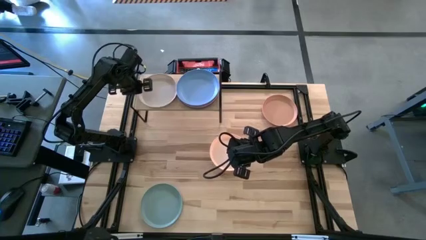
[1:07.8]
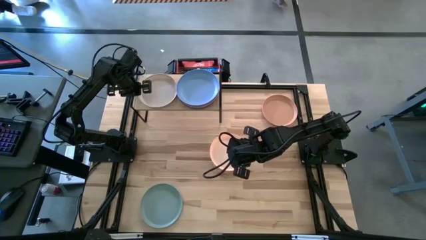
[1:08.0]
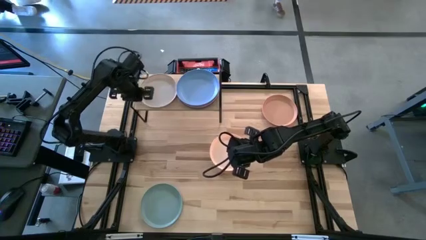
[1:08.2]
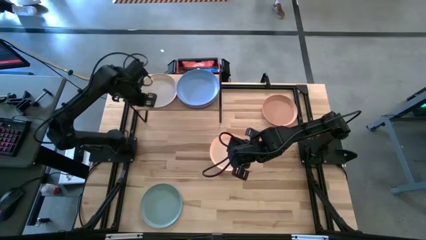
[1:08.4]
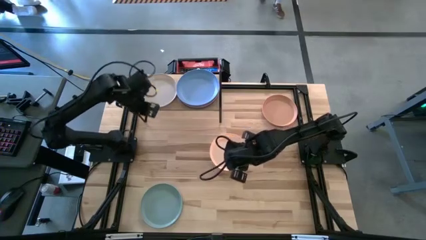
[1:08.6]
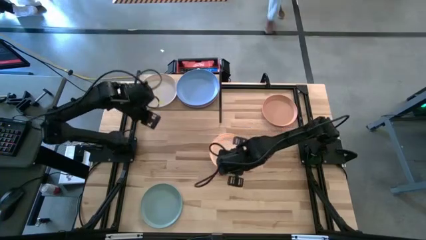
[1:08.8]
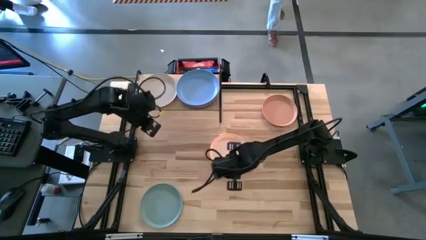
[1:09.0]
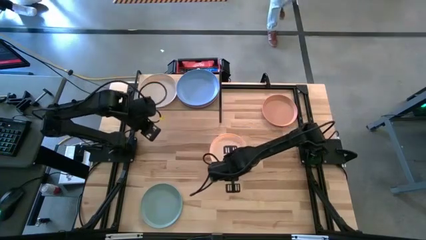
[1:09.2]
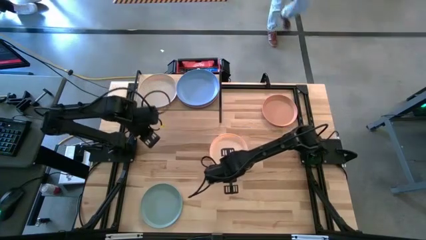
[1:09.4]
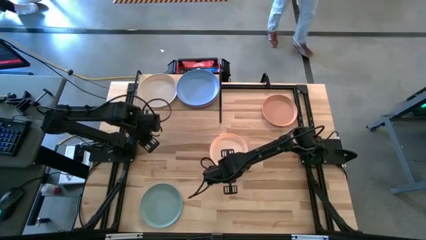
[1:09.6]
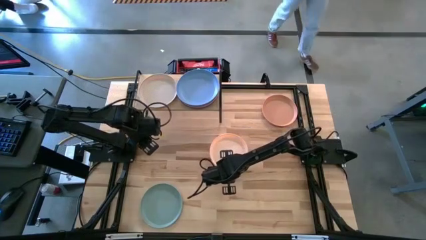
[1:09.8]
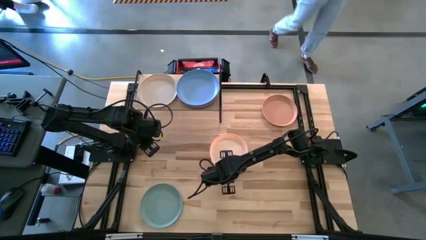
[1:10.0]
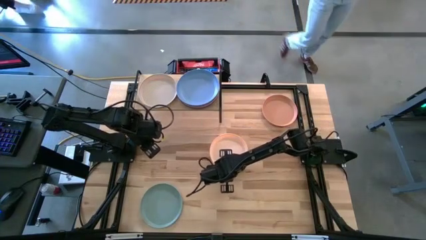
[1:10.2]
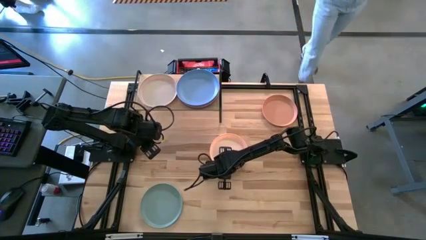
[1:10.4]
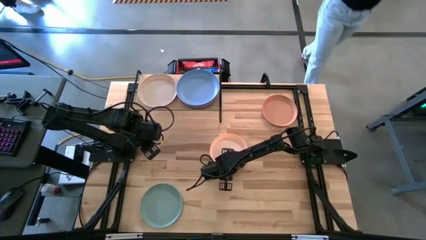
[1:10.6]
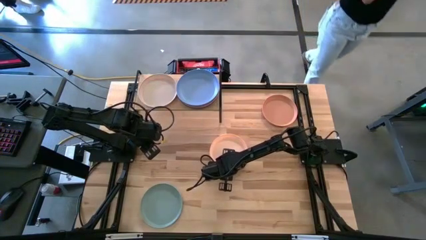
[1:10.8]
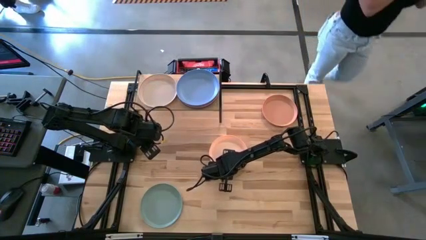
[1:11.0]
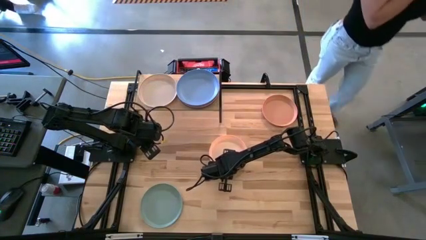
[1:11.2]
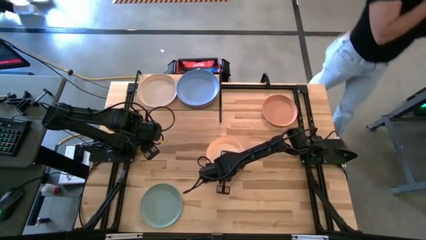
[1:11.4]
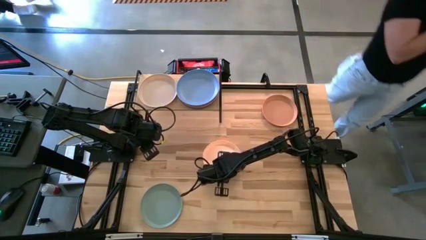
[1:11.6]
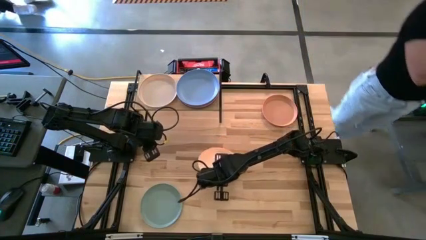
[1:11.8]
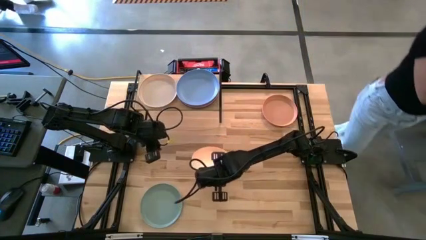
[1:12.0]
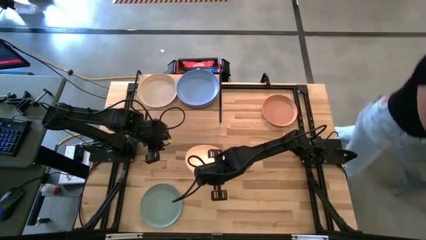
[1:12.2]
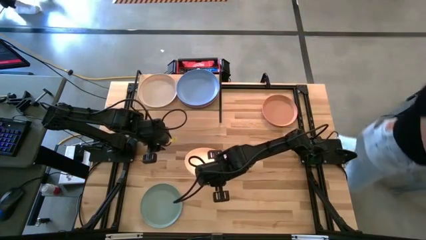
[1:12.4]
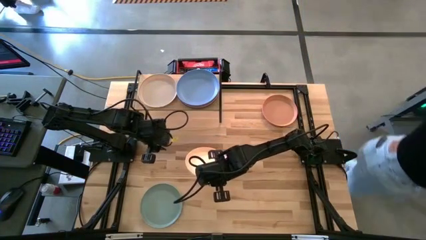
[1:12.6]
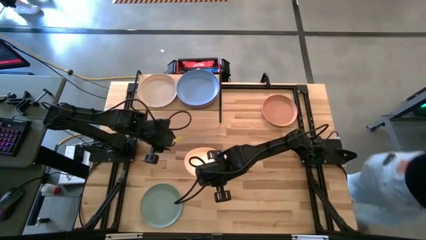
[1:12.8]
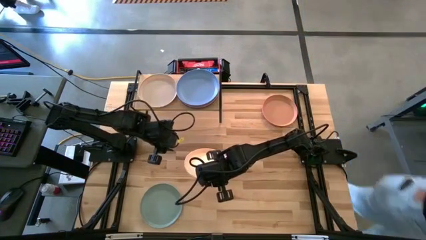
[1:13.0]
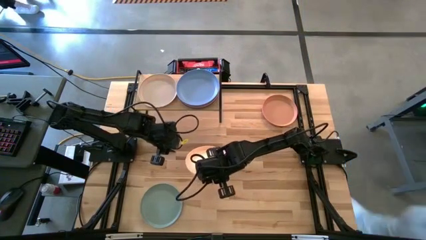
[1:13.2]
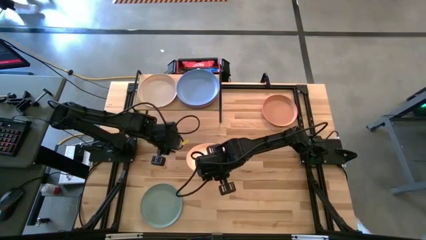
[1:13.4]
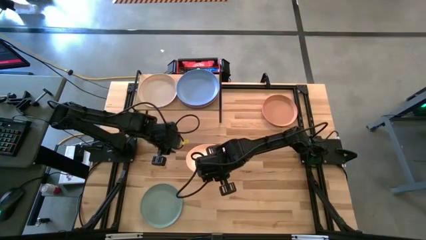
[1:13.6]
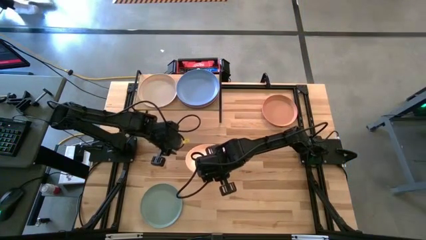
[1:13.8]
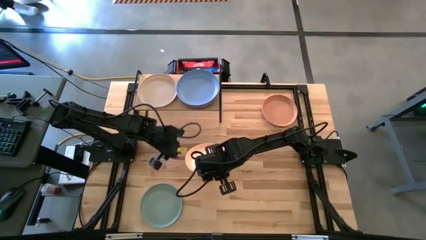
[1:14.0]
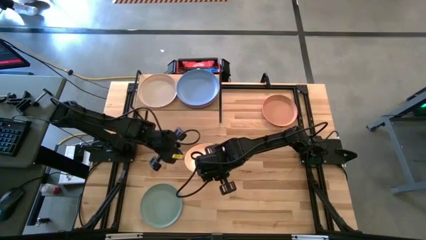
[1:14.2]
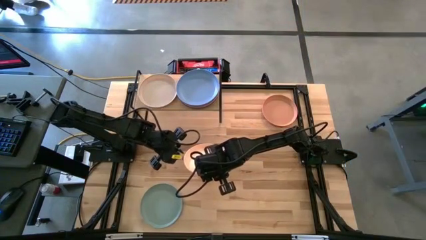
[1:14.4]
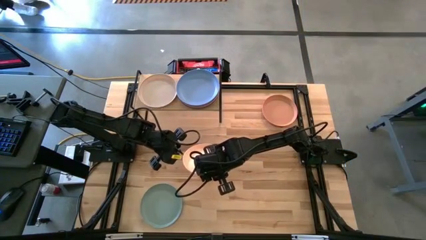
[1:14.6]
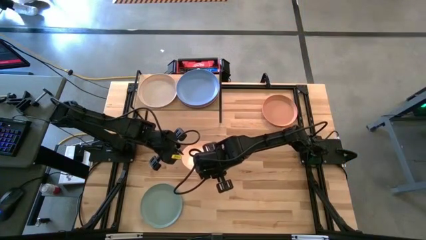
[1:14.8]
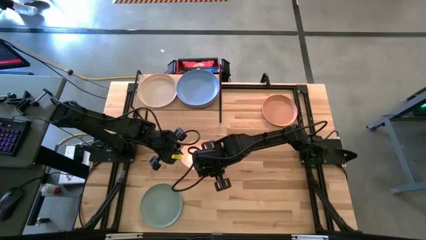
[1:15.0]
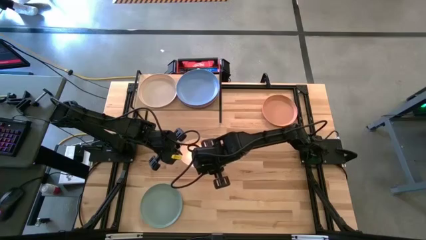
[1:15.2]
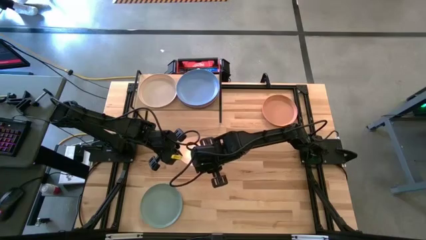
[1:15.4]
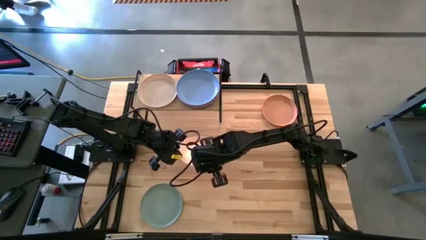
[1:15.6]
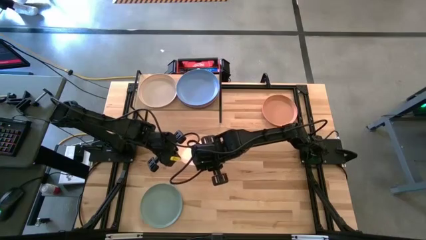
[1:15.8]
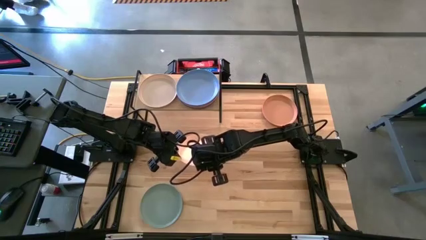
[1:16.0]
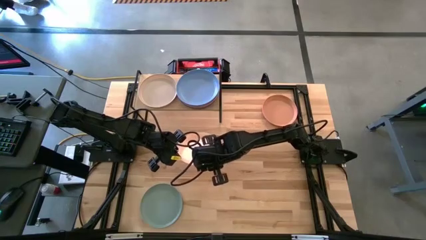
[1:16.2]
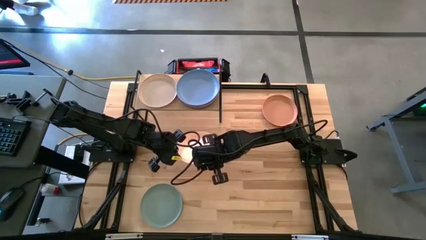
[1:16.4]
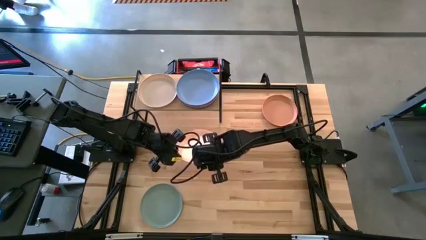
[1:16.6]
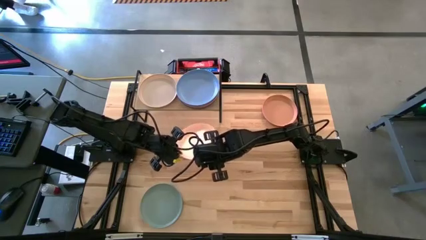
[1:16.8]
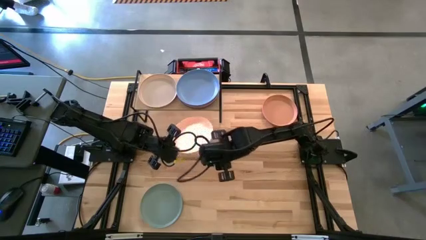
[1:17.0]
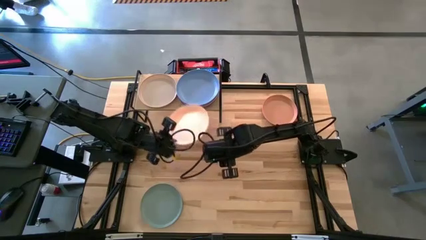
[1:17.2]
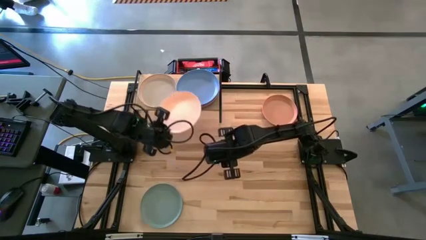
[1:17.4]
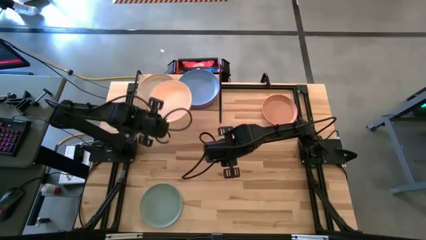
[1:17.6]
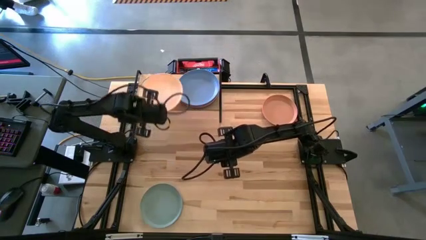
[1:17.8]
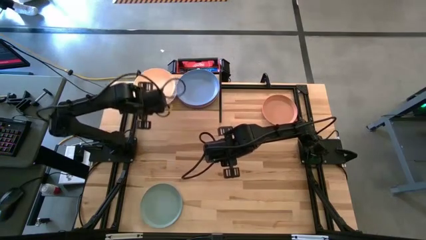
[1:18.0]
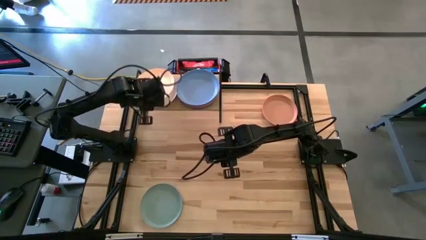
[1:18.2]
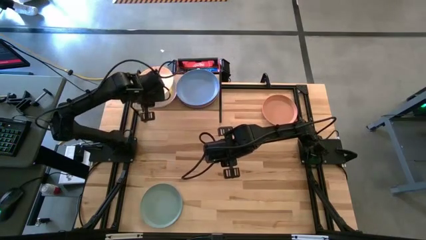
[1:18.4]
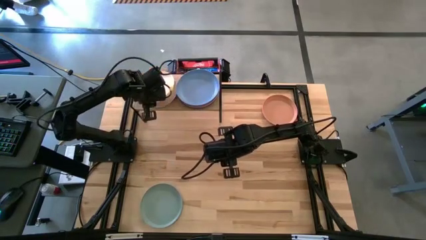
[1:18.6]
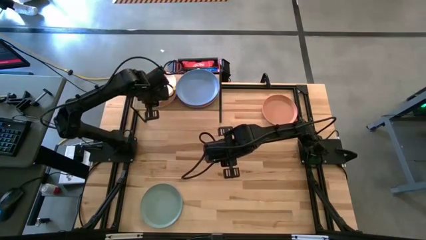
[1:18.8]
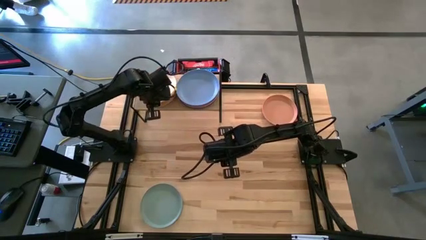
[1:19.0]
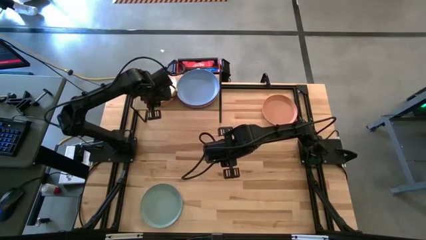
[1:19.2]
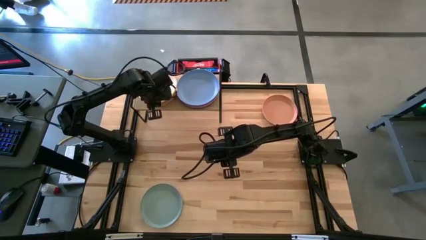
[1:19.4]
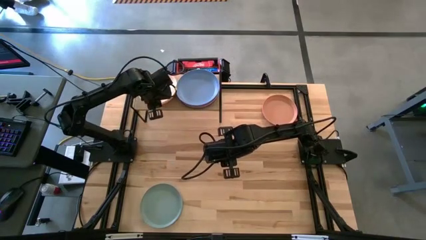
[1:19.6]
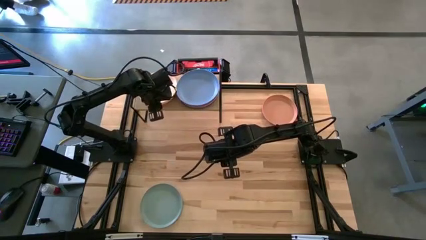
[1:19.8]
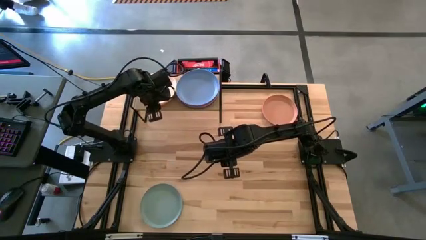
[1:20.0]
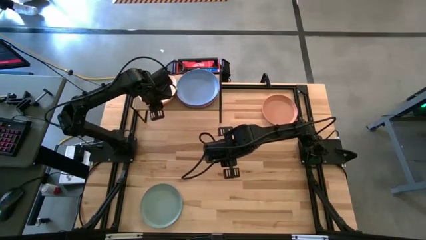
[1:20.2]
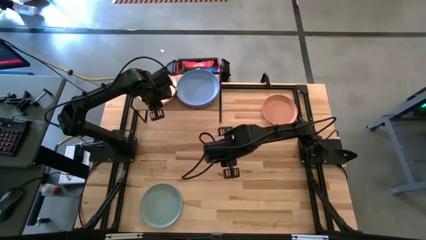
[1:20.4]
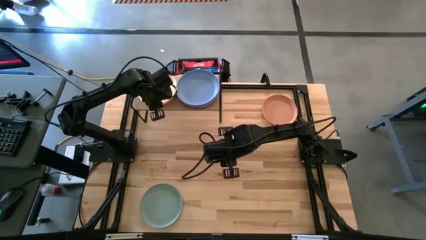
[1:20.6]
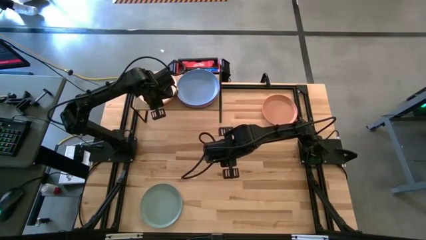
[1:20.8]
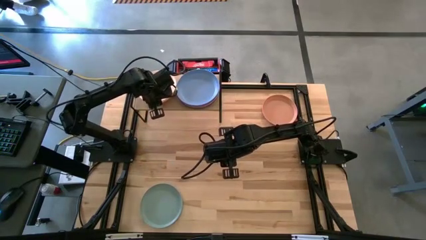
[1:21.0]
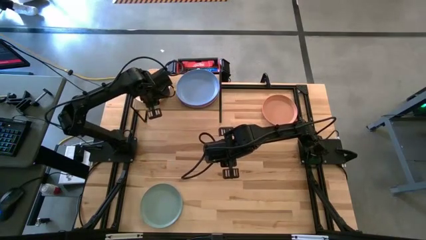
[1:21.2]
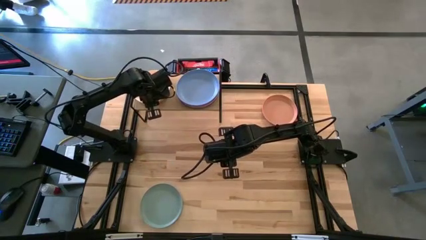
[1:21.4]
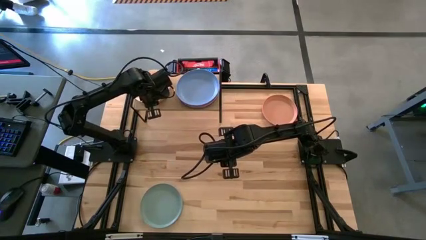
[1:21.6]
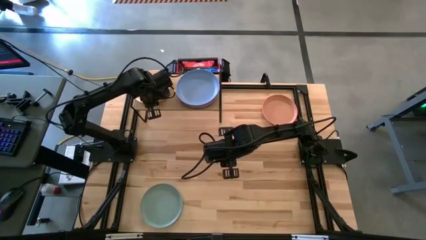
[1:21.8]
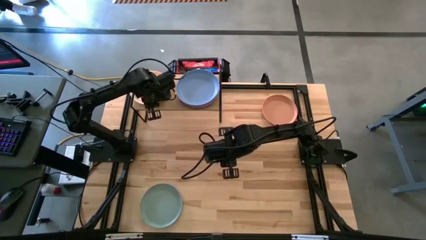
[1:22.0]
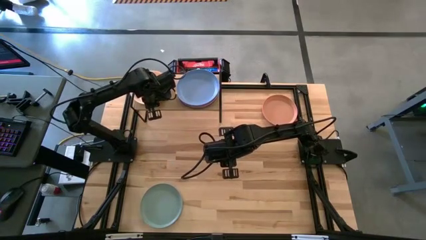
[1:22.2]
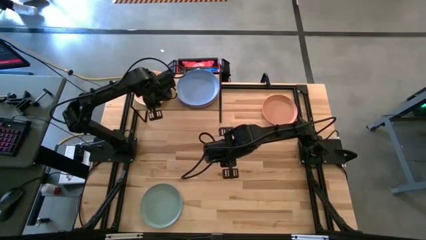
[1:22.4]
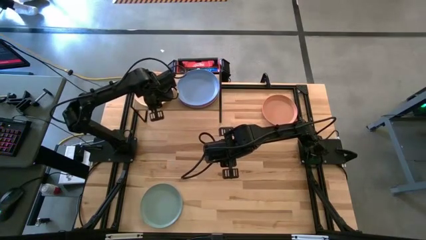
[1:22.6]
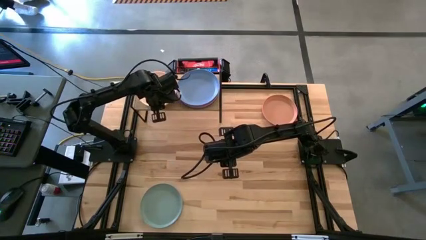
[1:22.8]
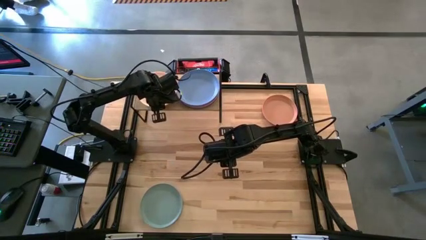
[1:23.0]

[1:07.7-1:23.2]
Task: Place and stack plates onto a shelf
Put the light orange plate on top the white plate on the shelf

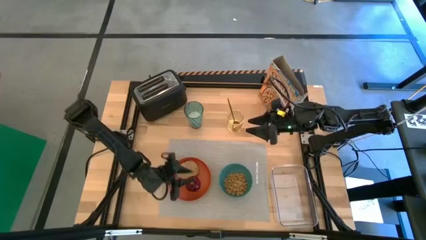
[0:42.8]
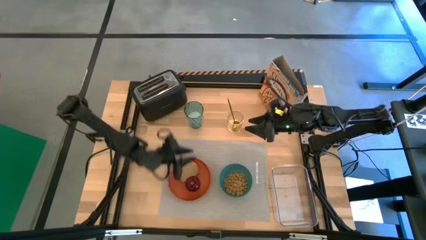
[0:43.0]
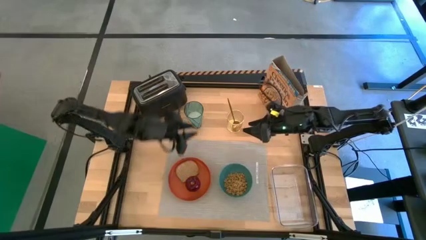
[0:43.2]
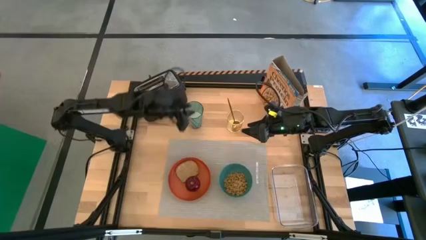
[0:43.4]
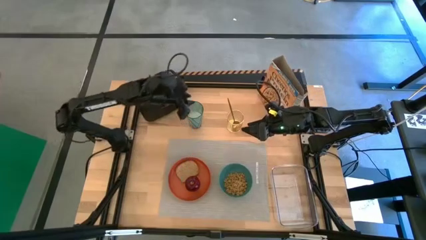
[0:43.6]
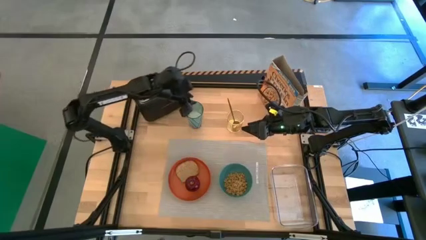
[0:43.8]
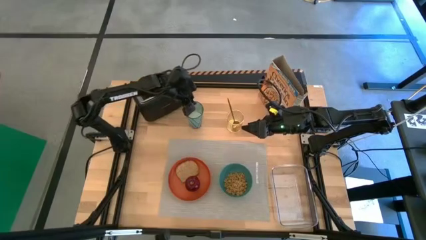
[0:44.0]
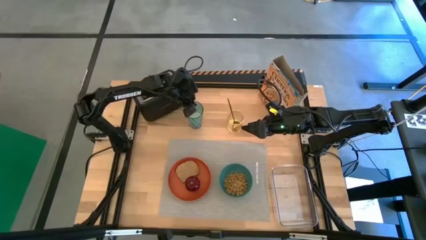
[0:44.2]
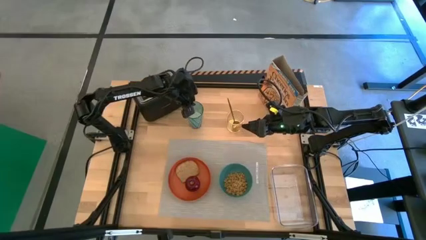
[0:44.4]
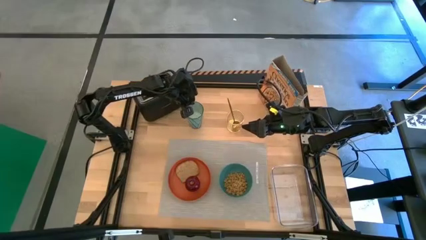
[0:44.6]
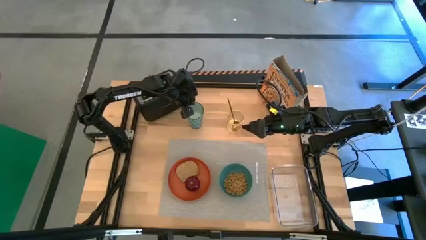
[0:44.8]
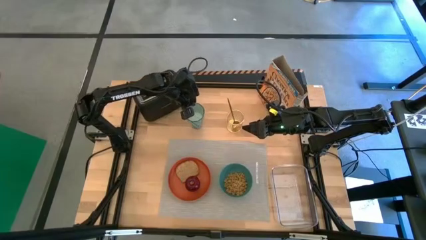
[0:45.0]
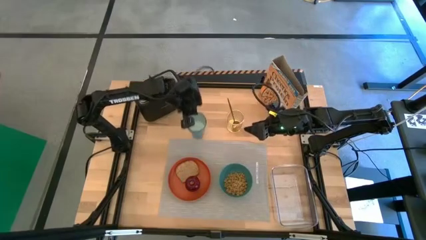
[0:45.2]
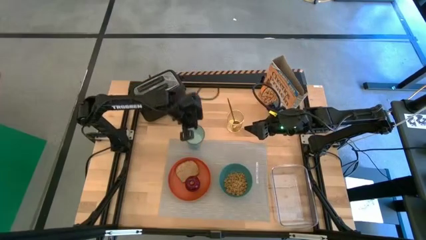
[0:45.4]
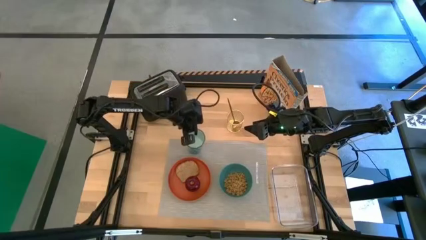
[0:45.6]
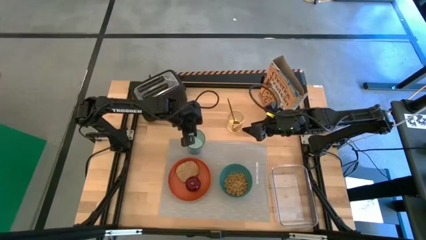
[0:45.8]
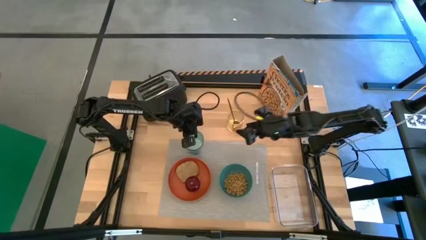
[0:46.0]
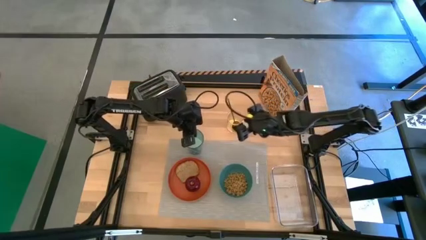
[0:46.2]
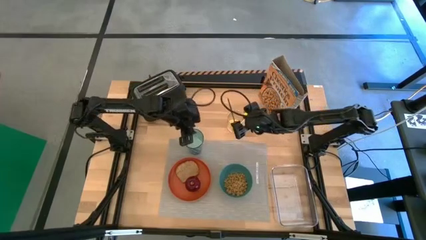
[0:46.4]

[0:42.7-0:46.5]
Task: Arrange a breakfast setting
Put the blue cup with rice on the gray tablemat
